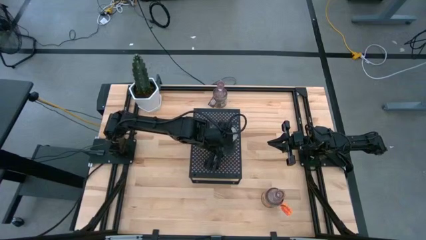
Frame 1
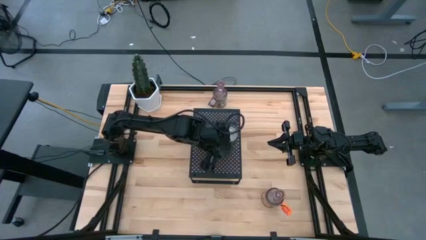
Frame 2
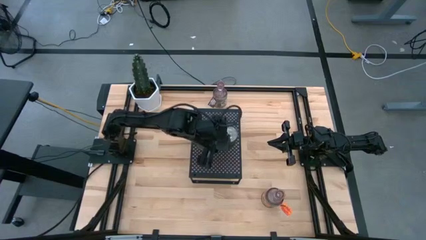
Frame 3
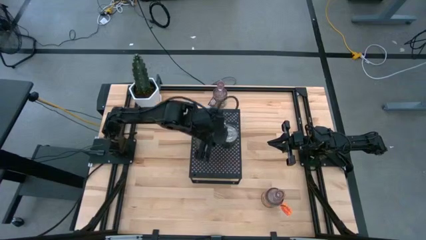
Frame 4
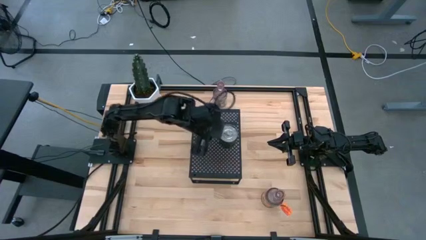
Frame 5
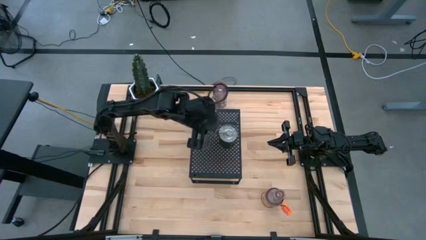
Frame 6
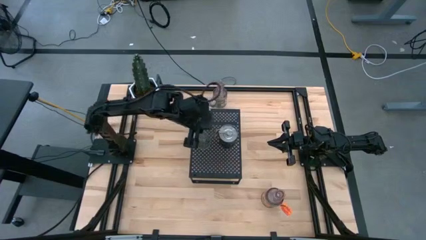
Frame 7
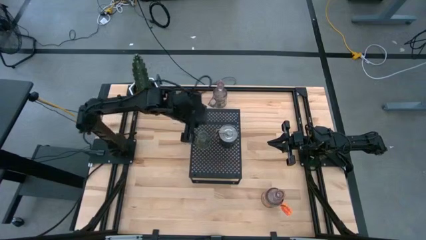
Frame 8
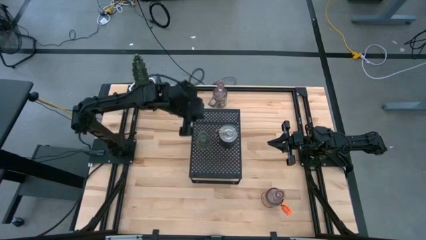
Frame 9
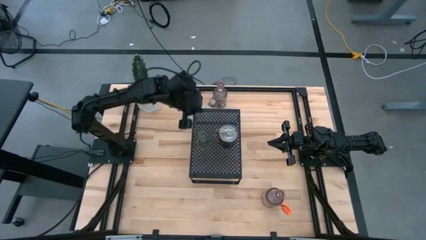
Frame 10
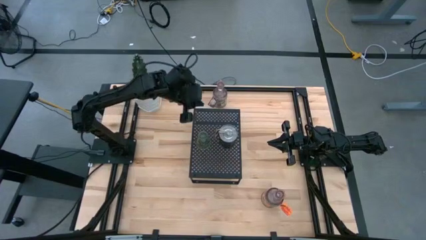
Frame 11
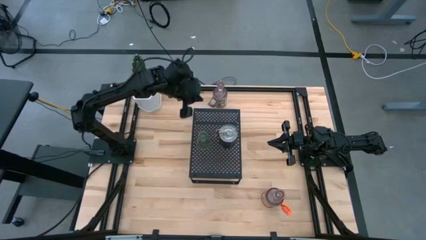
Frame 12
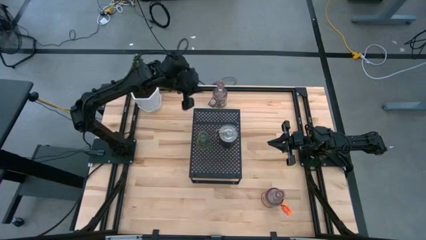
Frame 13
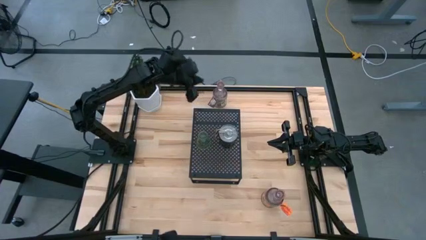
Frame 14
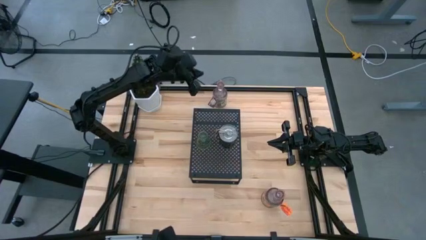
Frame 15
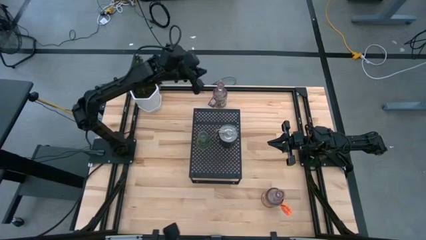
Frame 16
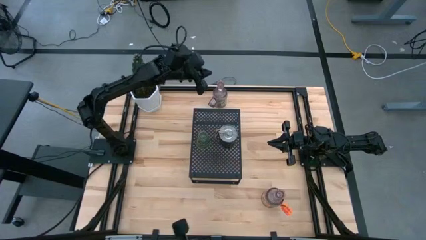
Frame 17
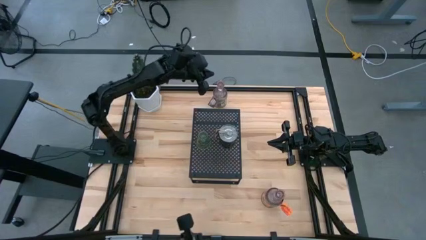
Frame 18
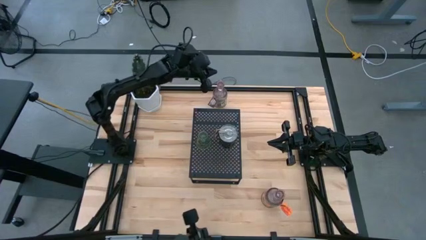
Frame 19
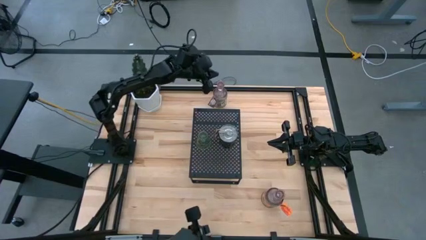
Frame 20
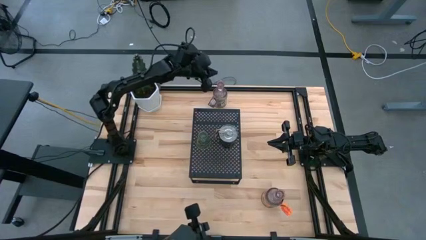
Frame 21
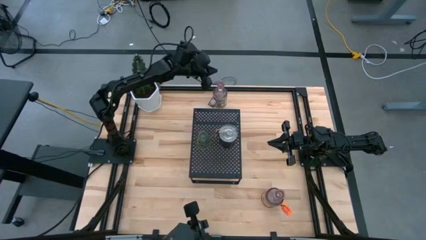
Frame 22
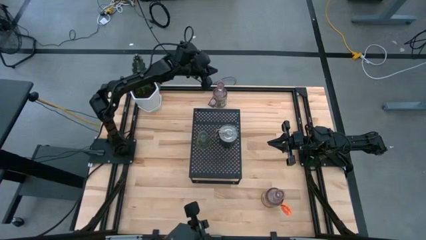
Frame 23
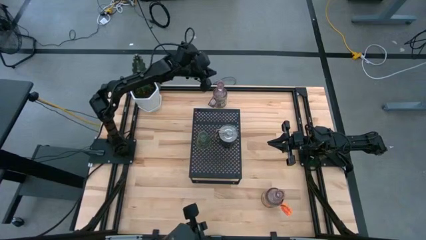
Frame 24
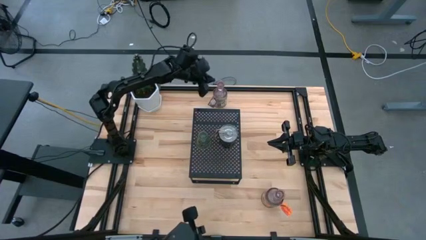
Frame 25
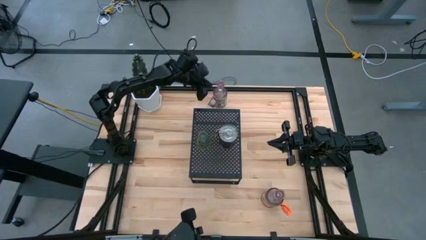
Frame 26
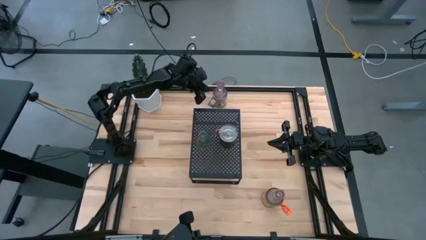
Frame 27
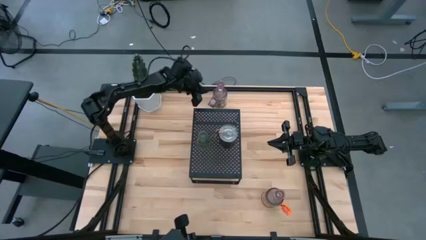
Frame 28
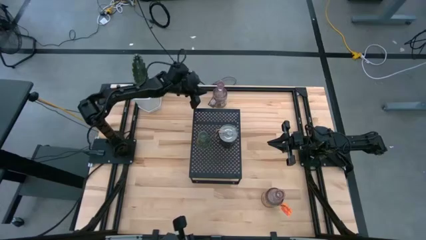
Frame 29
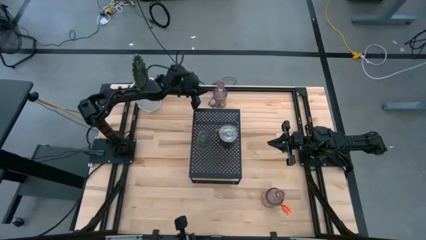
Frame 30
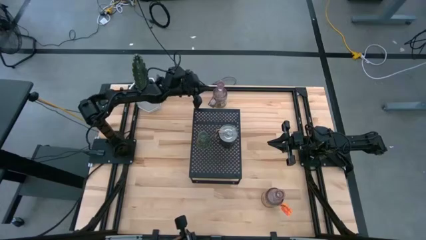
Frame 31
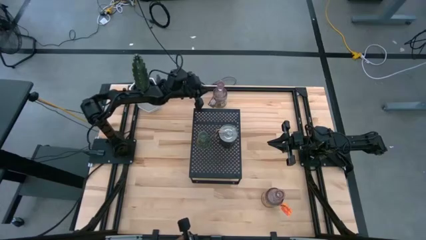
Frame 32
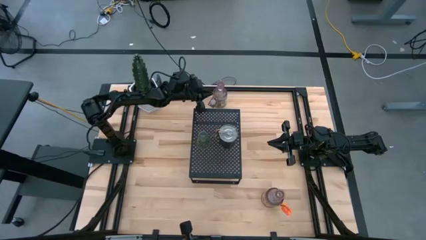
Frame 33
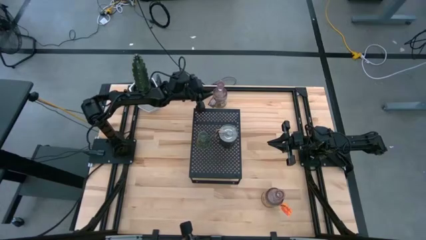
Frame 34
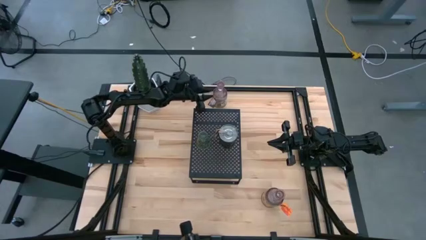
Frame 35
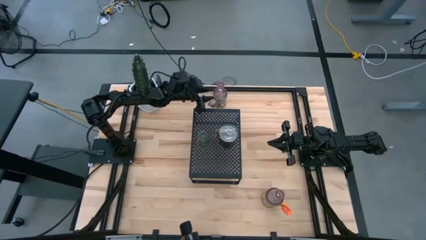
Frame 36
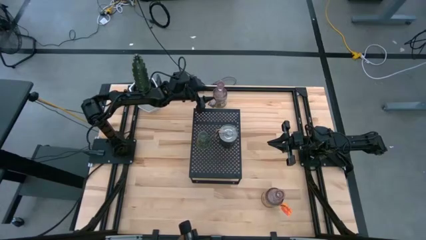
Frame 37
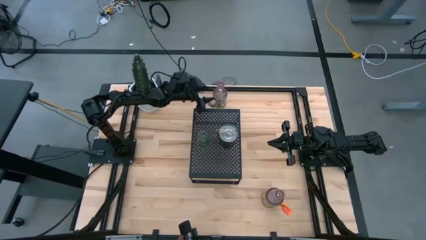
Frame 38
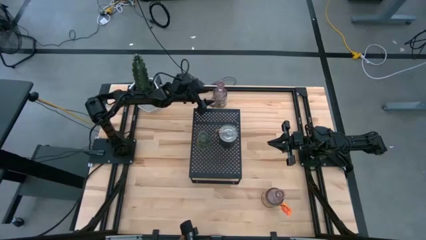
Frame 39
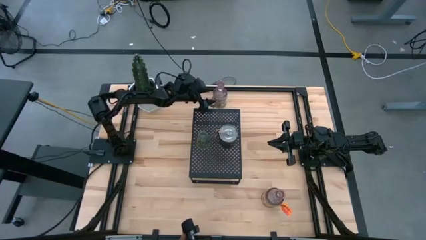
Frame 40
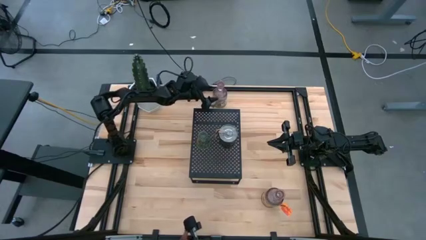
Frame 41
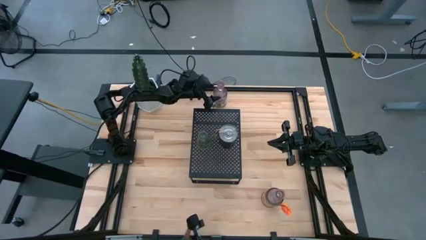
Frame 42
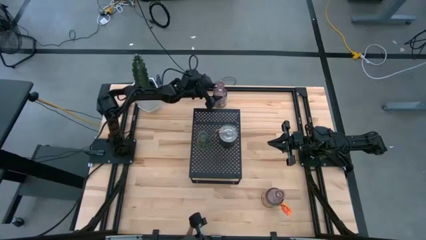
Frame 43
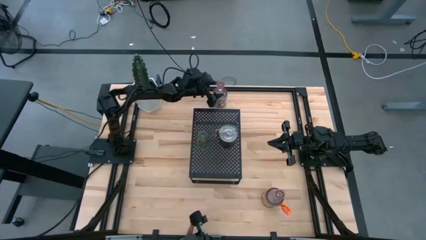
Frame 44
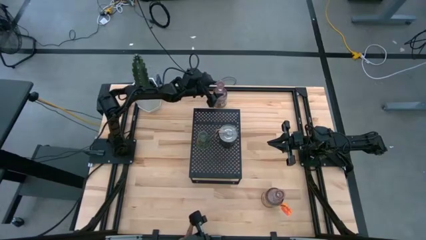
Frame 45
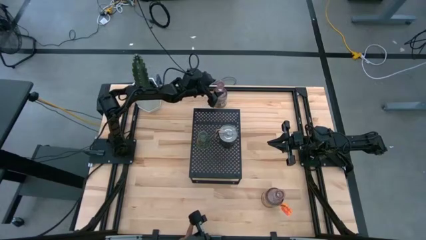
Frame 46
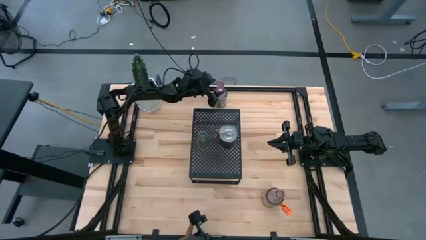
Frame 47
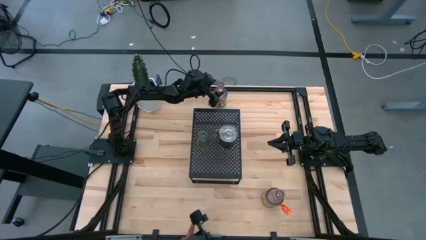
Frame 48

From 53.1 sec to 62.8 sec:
Task: Pick & Place candle stick holders
Put the top pink candle vase on the shelf

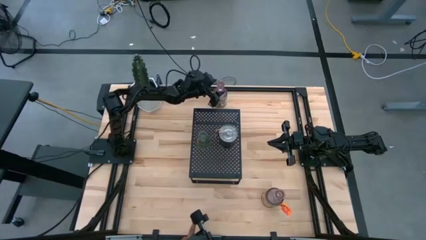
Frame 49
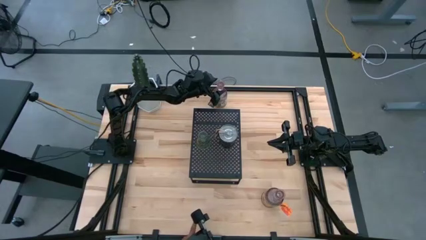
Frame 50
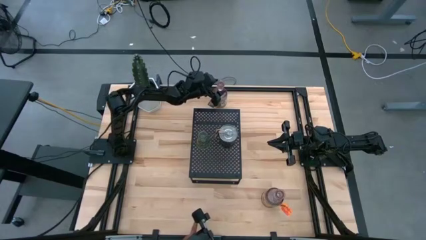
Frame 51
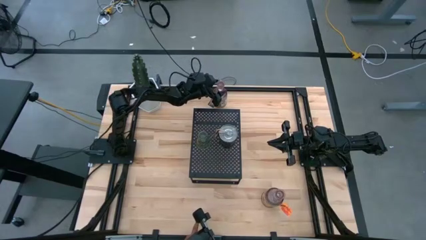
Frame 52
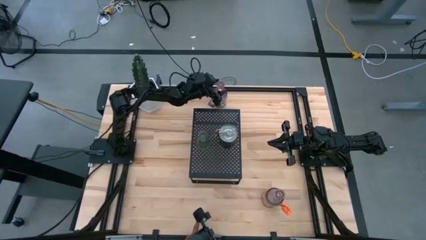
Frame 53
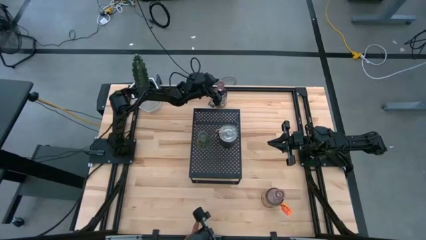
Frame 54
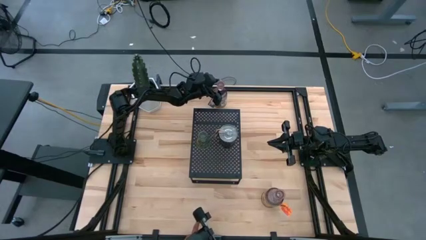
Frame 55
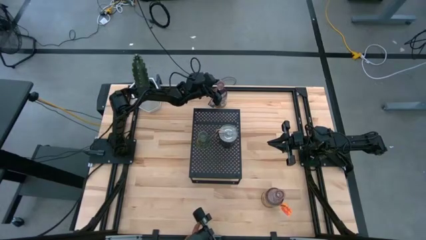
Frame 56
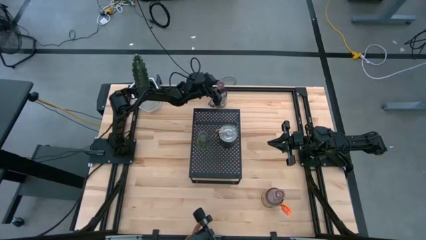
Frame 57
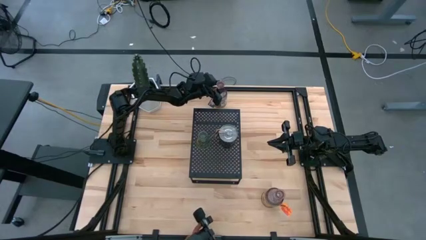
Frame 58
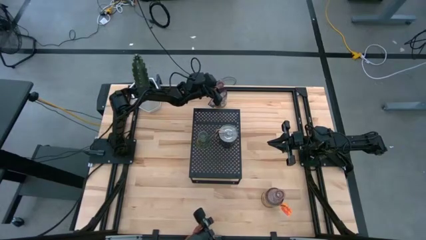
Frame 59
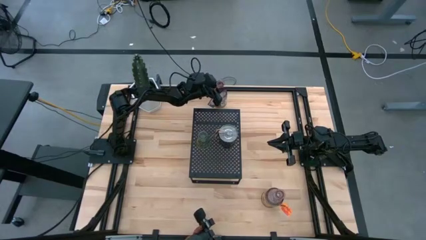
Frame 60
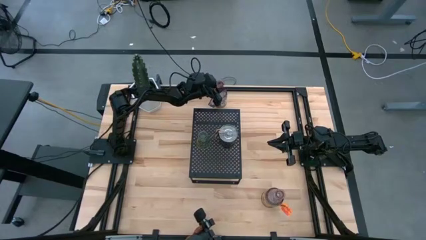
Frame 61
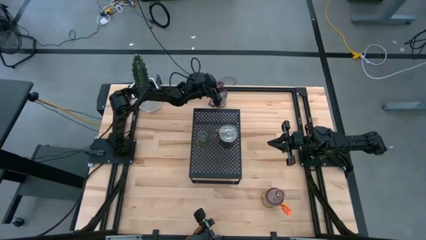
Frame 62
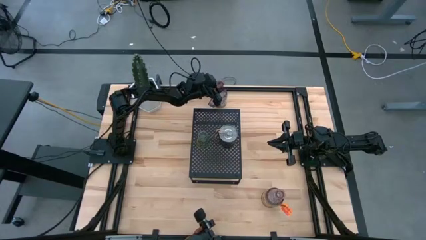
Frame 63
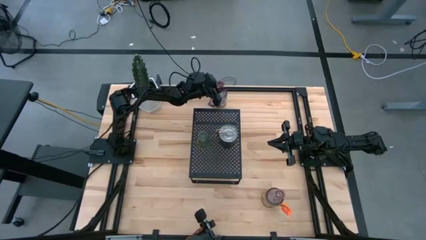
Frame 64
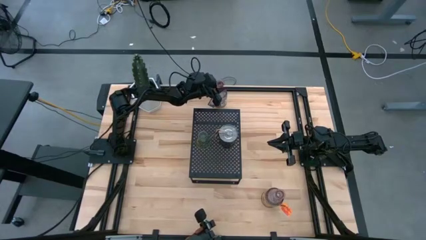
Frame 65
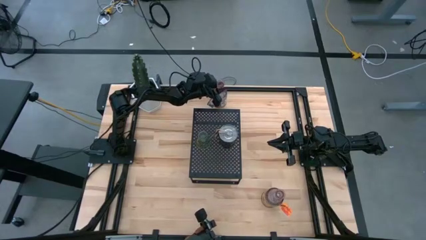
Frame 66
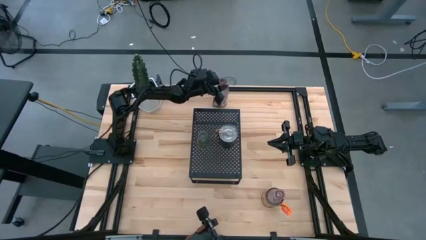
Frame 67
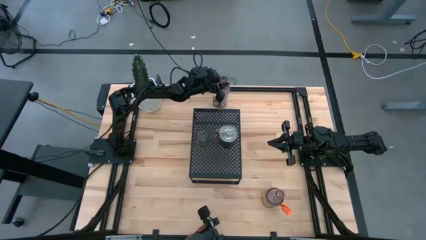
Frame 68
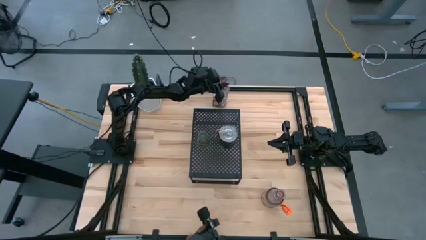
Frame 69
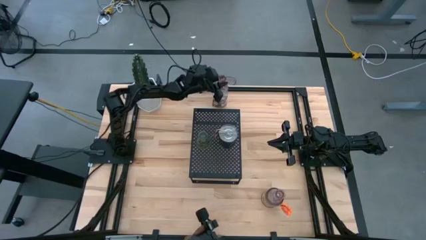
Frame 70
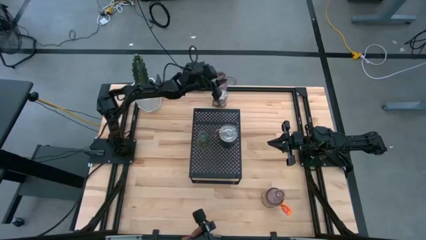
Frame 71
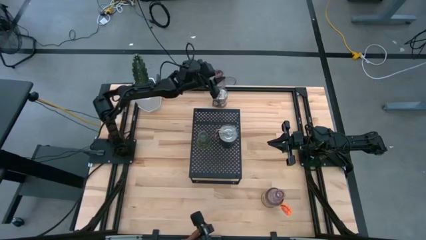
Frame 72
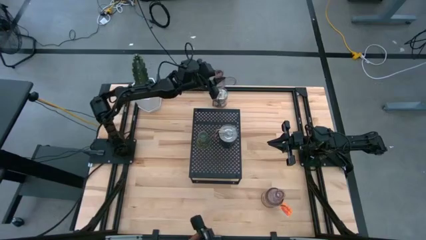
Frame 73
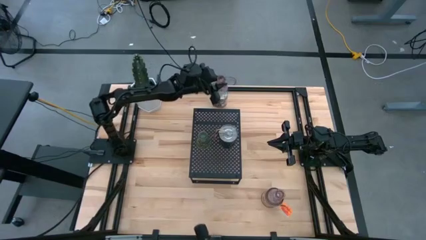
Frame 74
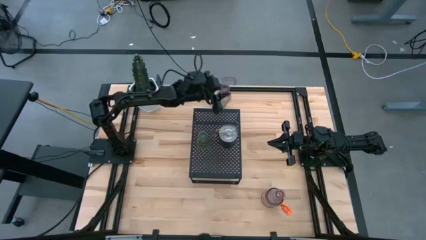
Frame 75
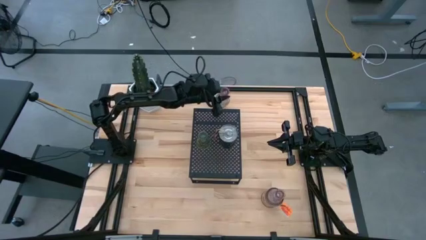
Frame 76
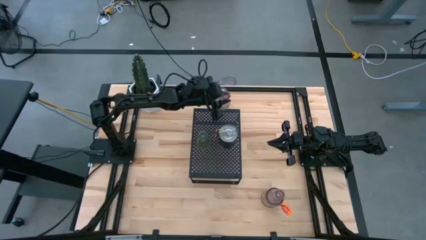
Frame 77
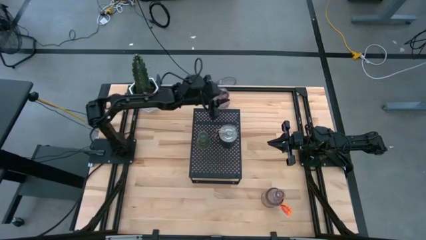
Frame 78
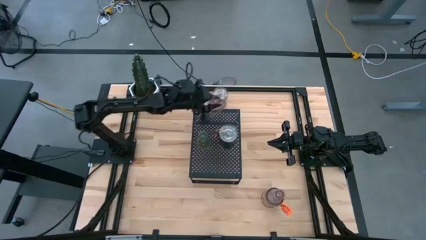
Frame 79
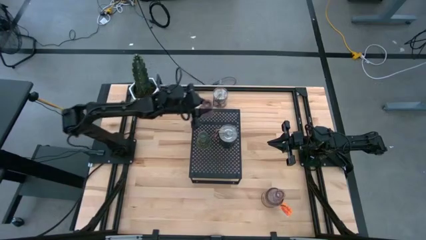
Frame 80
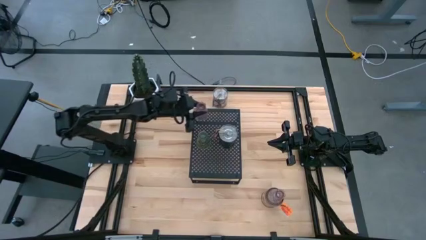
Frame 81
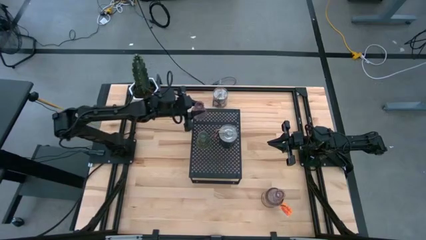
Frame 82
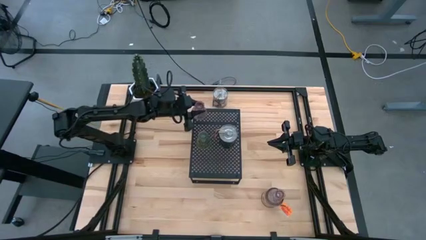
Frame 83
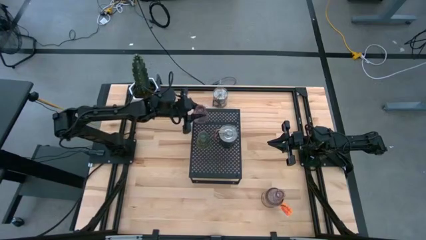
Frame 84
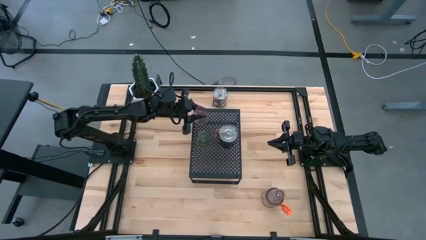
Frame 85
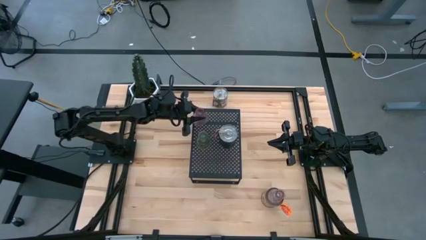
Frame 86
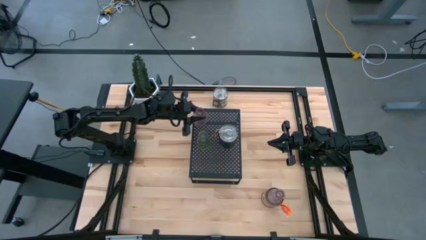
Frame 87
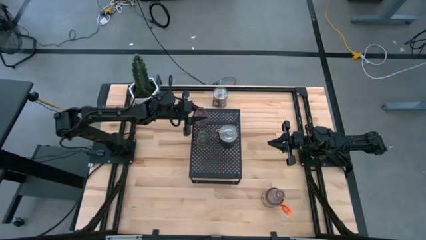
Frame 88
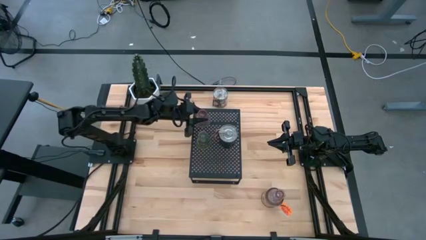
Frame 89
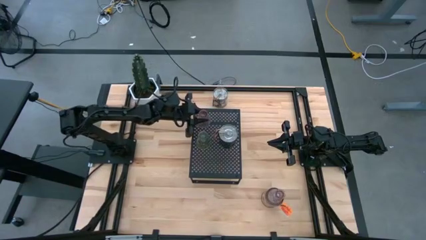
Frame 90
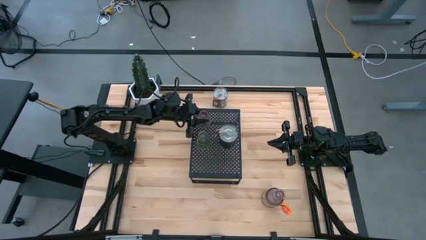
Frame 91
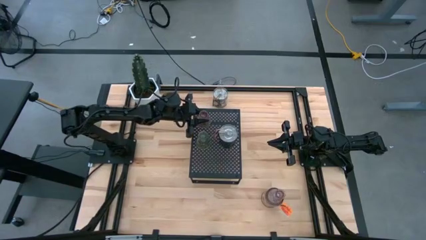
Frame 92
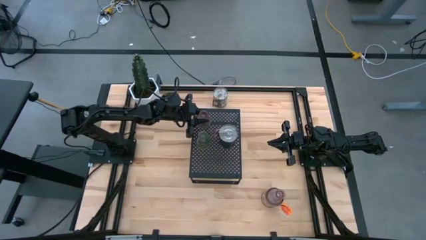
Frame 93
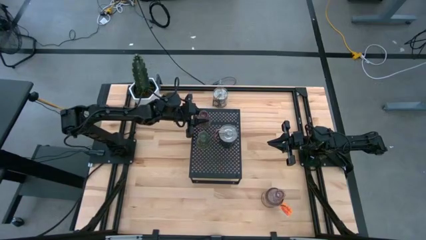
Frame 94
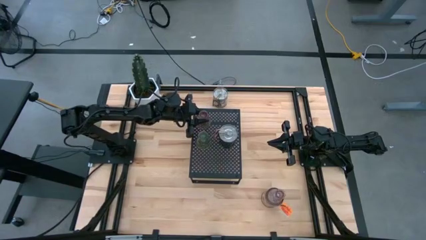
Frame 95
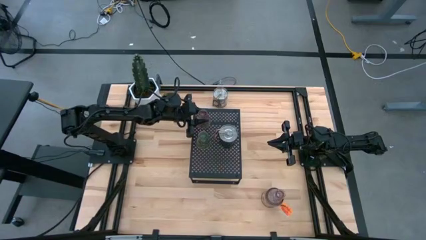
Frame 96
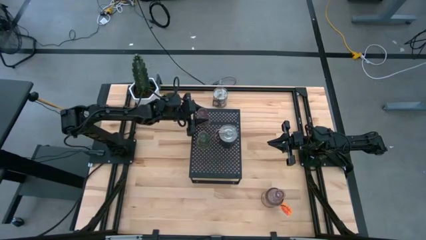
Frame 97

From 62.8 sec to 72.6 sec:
Put the top pink candle vase on the shelf
